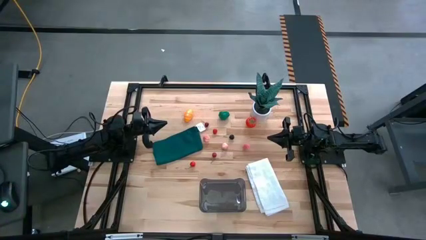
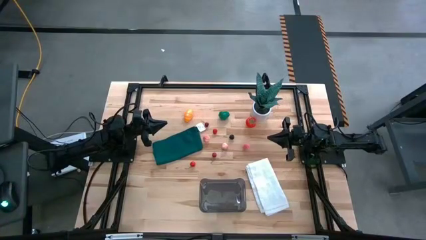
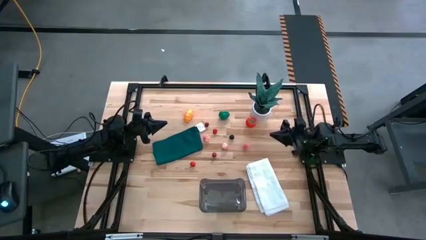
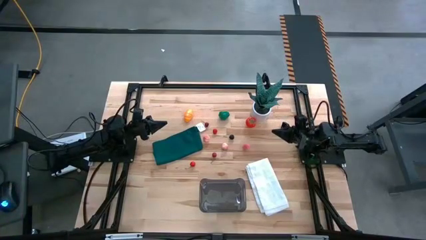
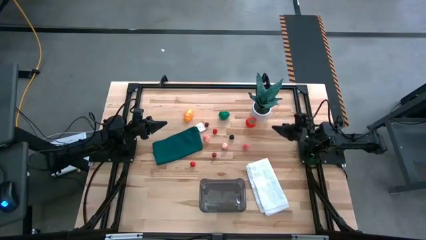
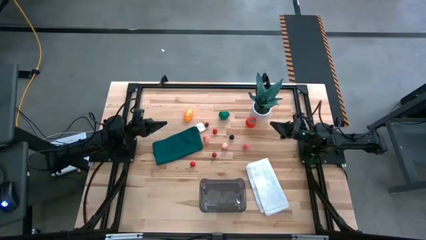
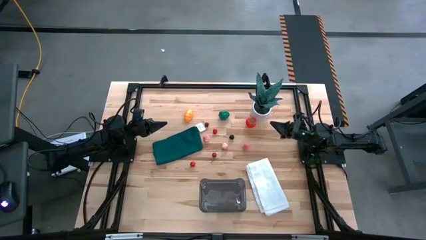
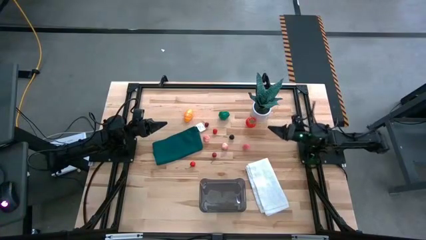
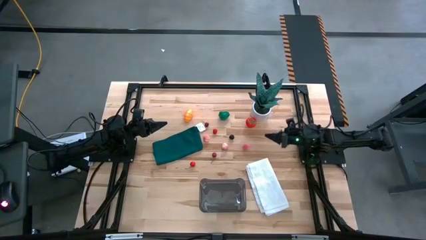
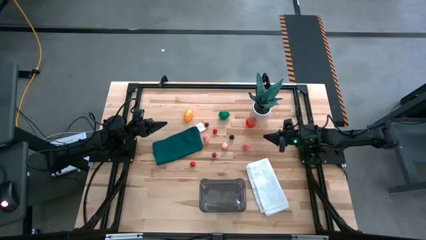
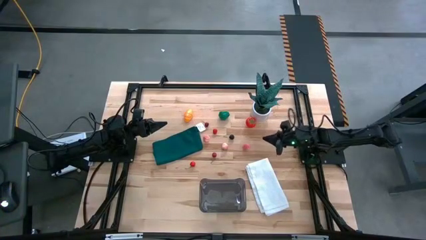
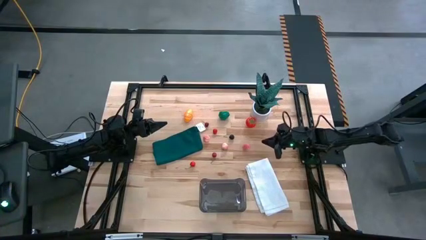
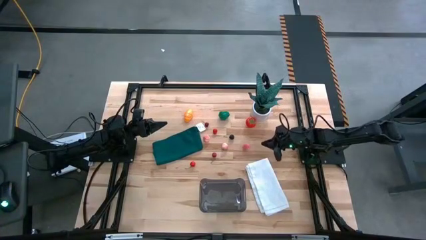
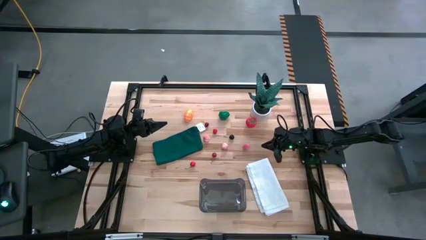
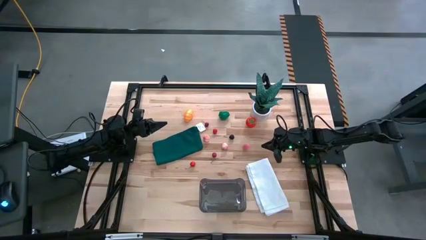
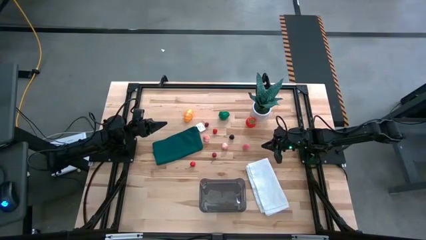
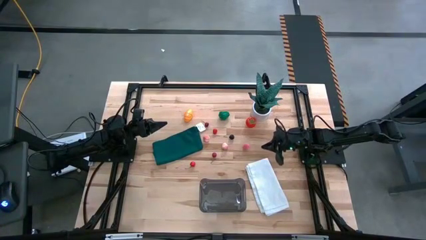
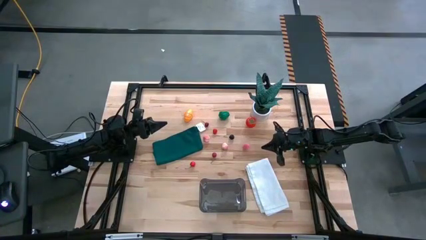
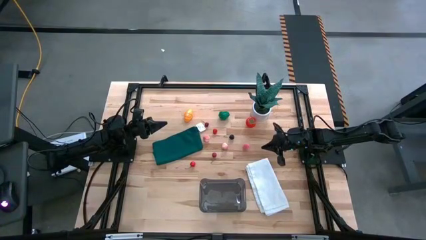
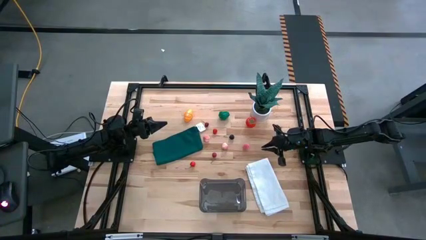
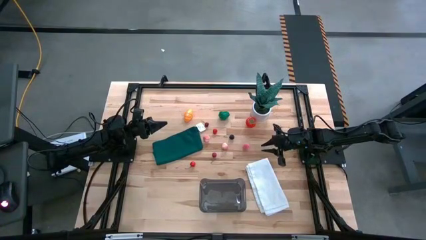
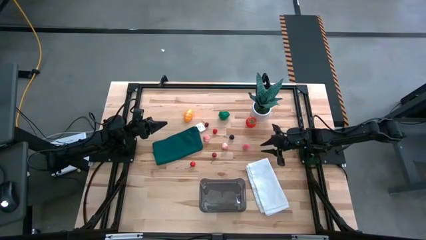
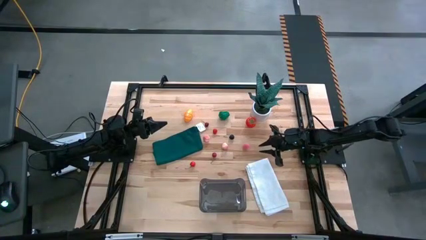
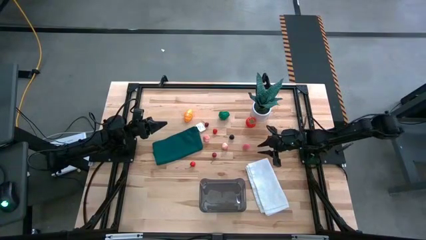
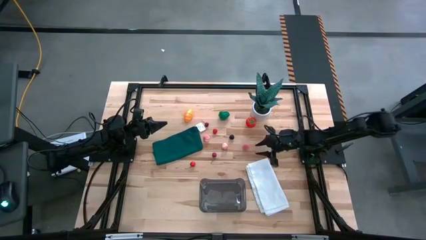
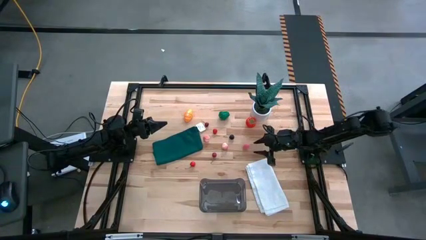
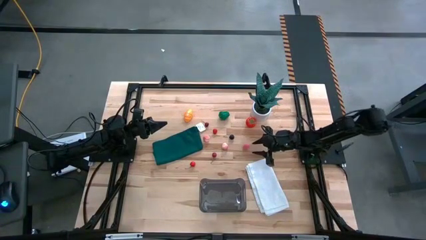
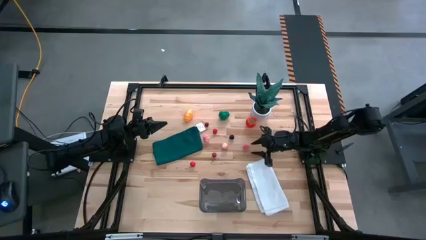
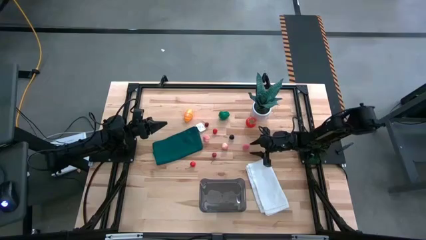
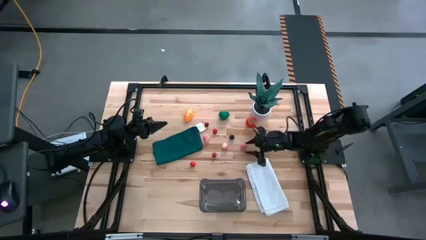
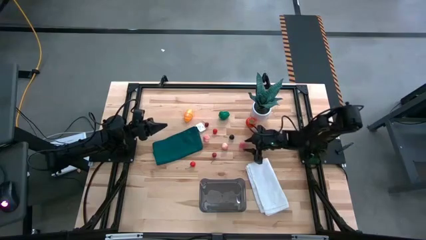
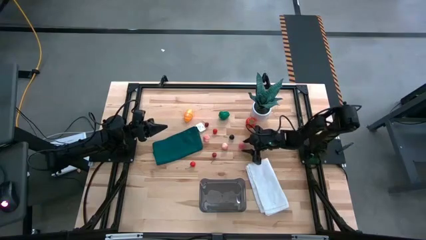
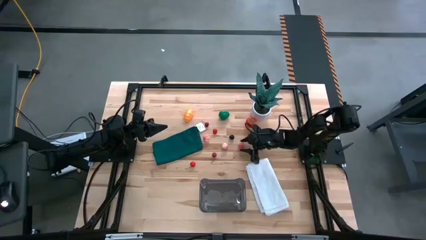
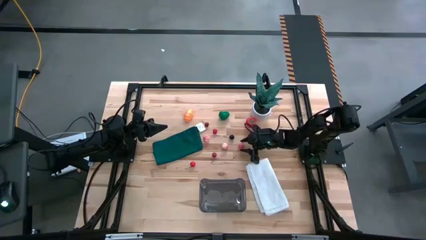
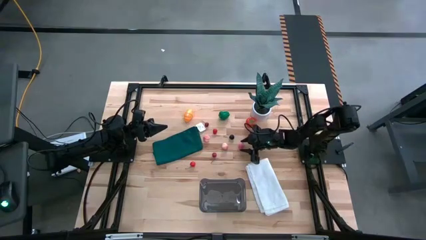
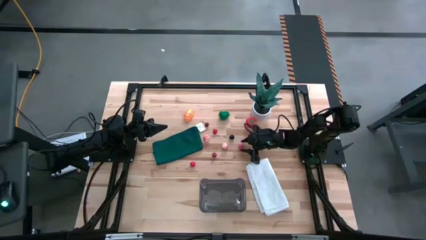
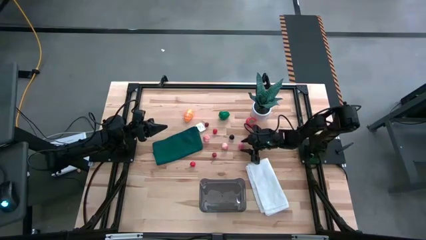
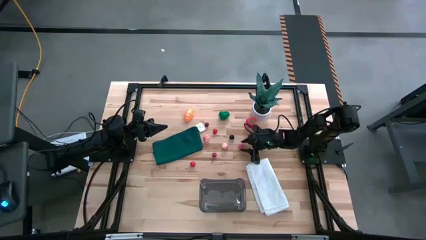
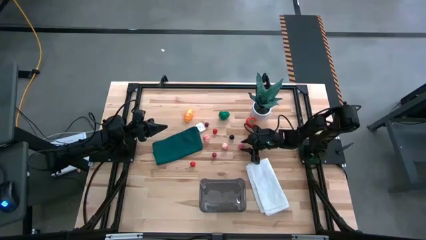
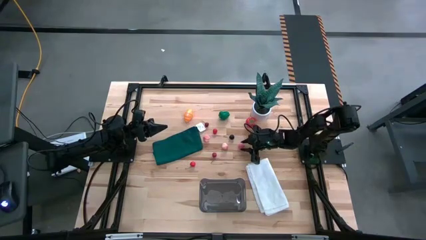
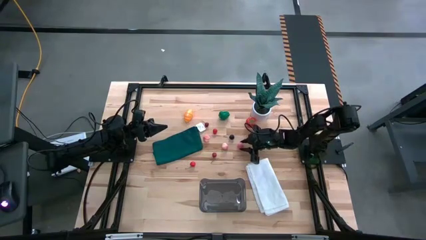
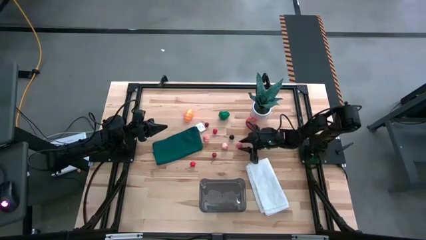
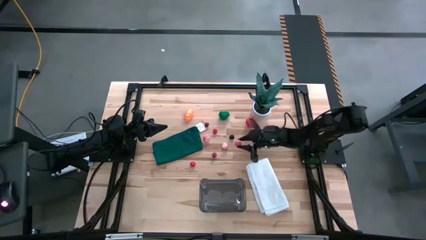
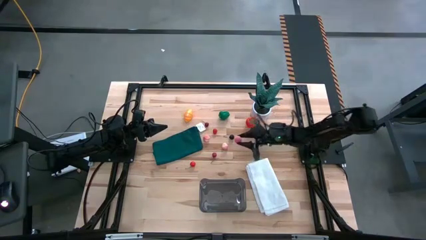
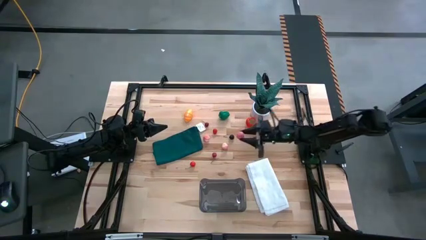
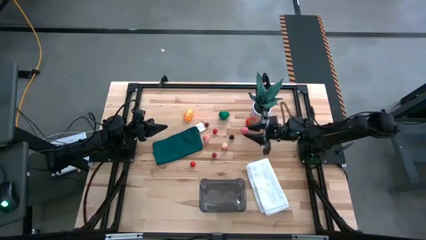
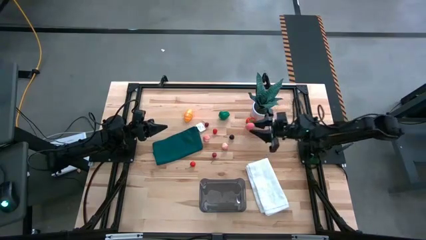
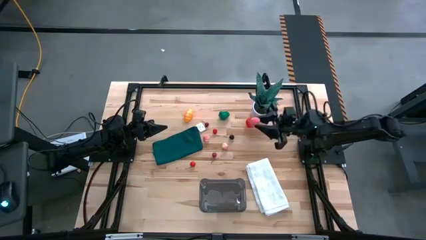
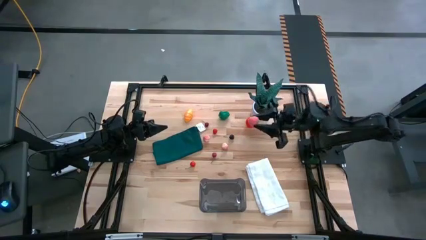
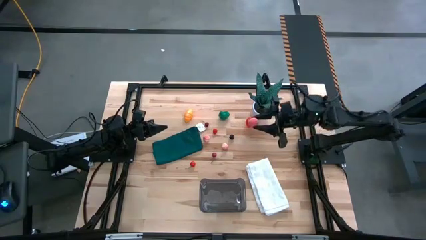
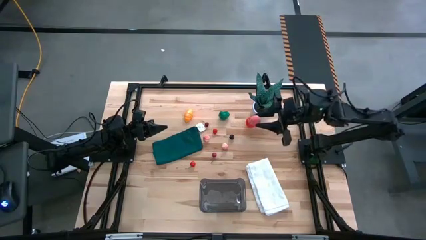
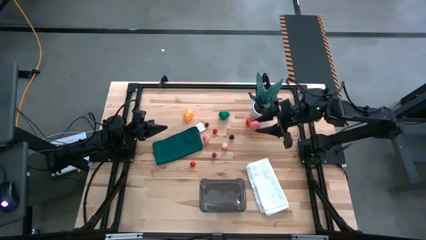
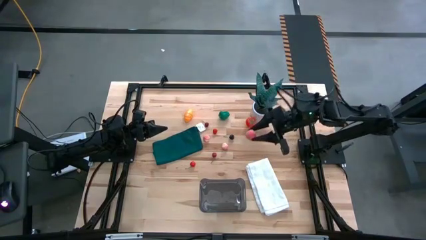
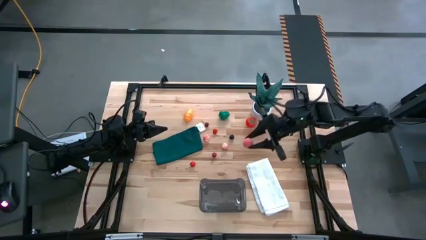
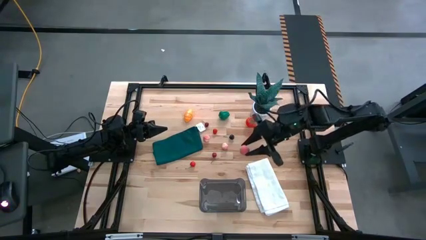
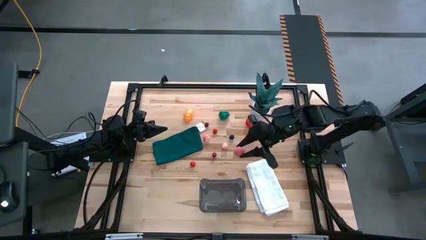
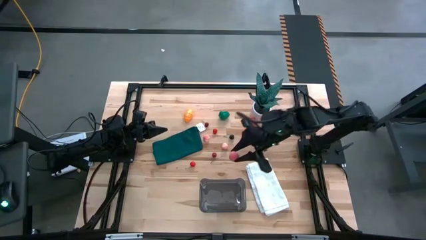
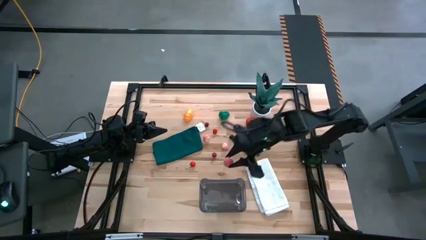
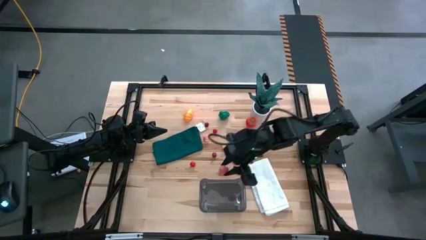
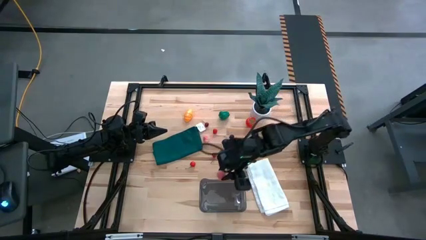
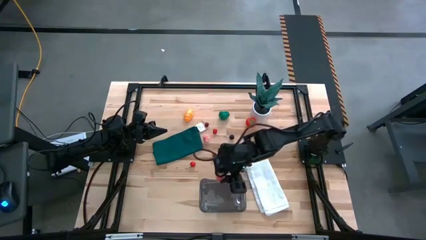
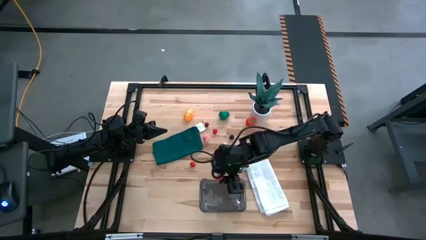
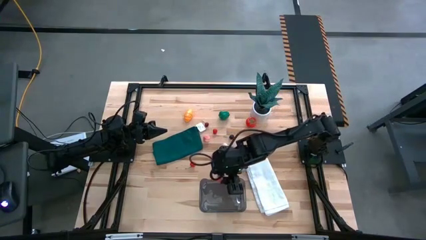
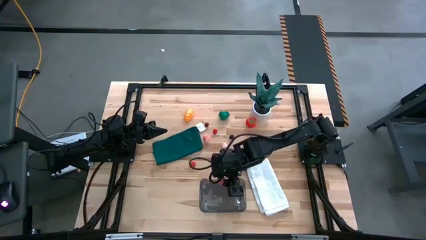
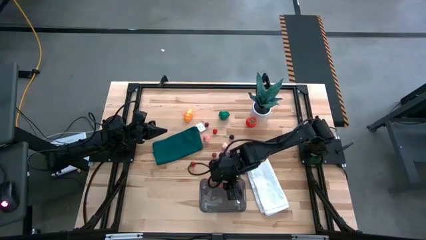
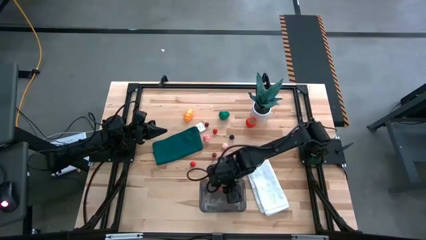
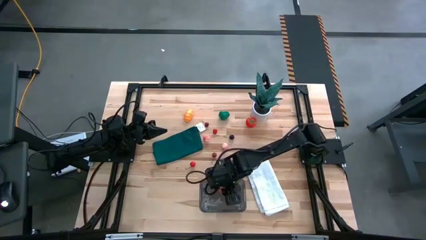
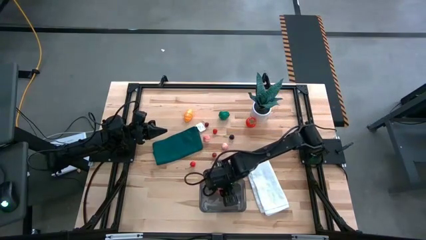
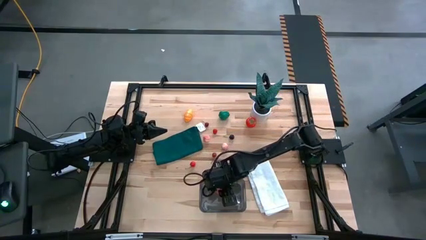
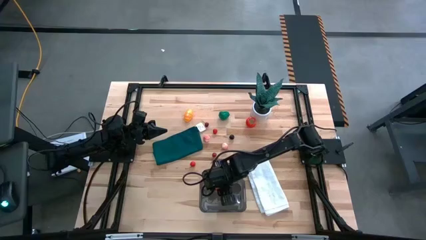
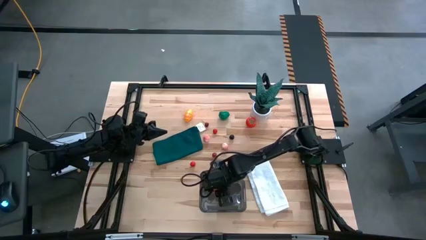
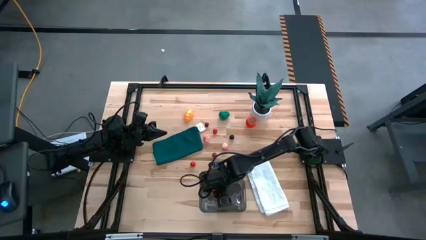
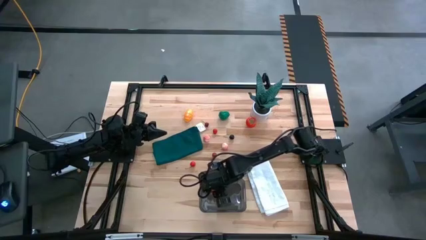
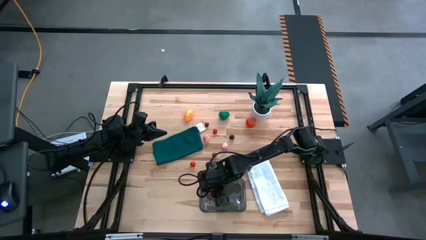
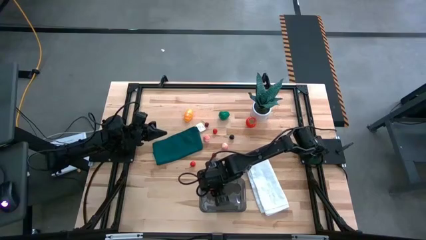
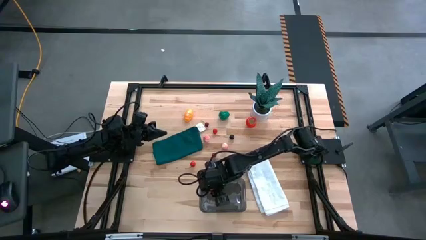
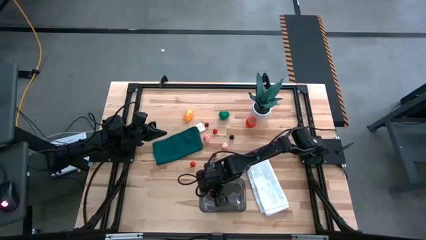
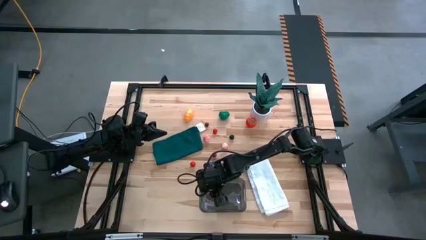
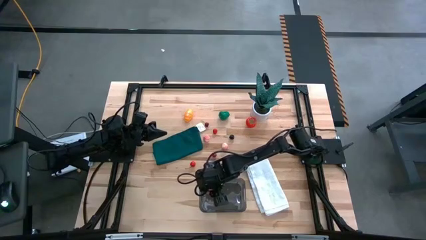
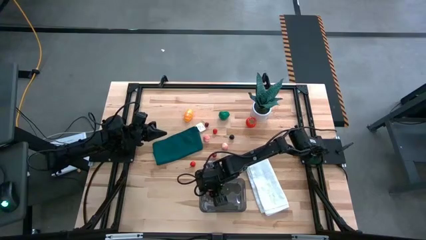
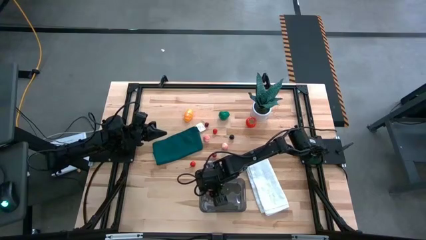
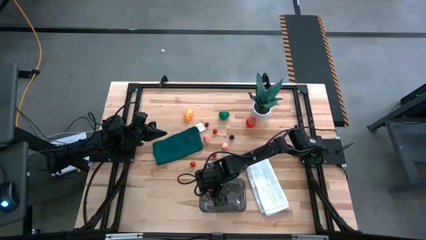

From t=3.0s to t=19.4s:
Task: Pick and placing Produce into tupperware
Put the right pink peach into the black bin
